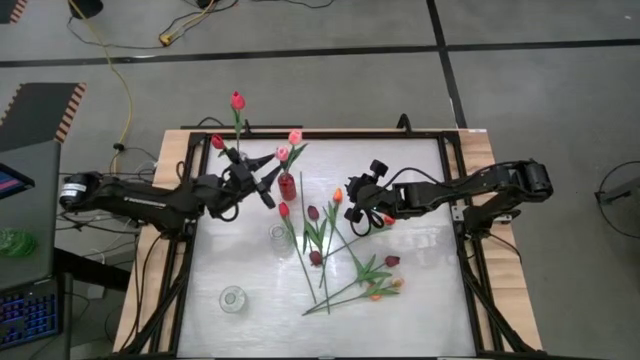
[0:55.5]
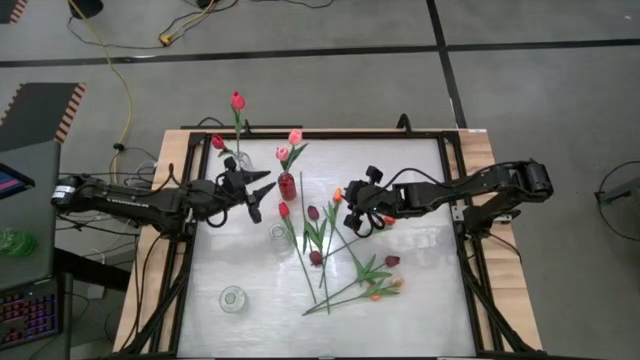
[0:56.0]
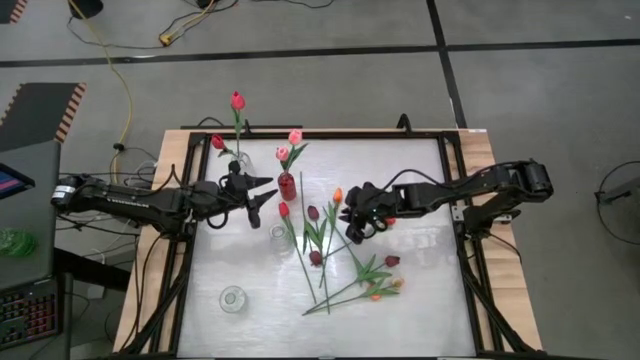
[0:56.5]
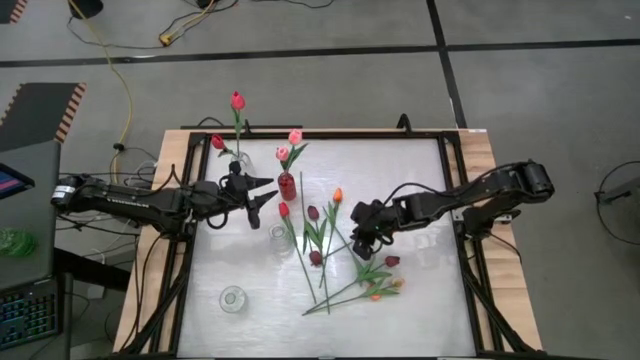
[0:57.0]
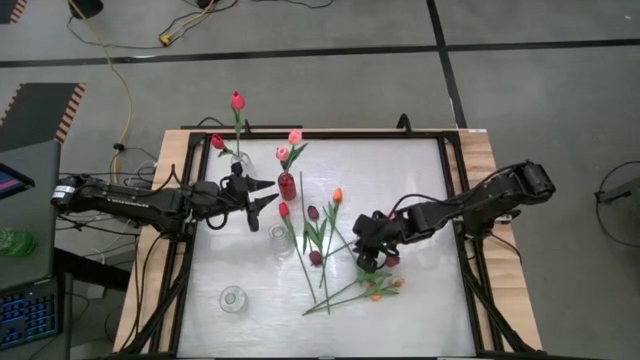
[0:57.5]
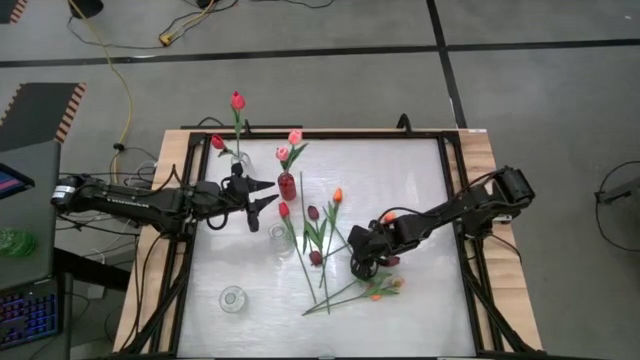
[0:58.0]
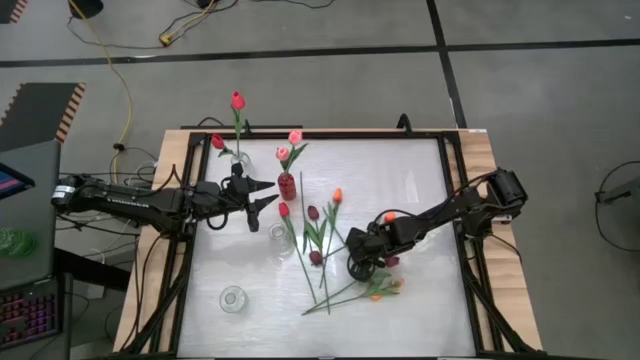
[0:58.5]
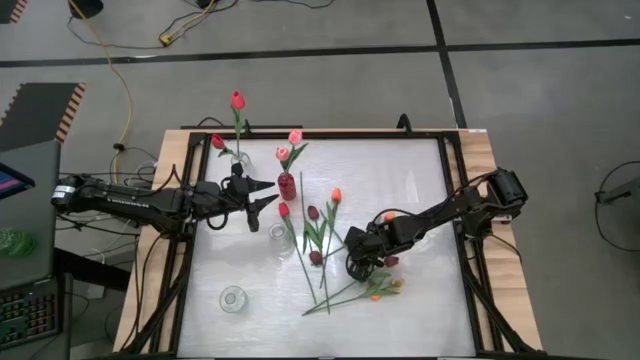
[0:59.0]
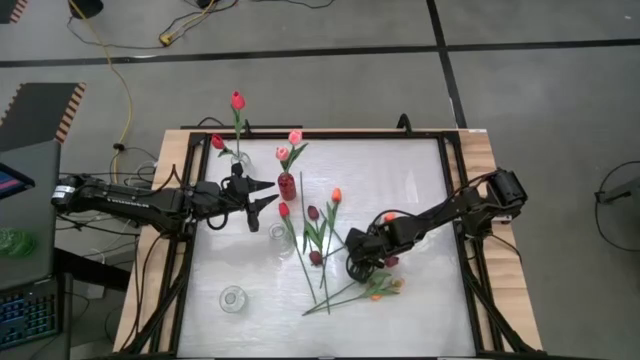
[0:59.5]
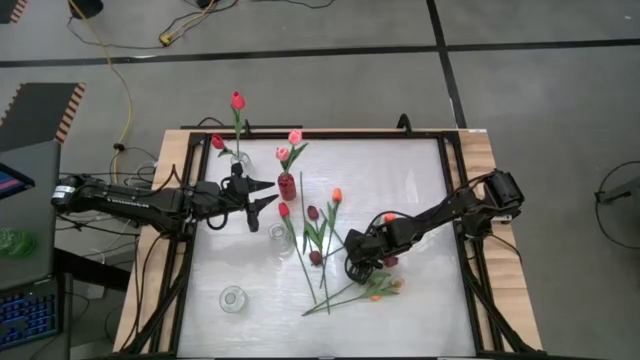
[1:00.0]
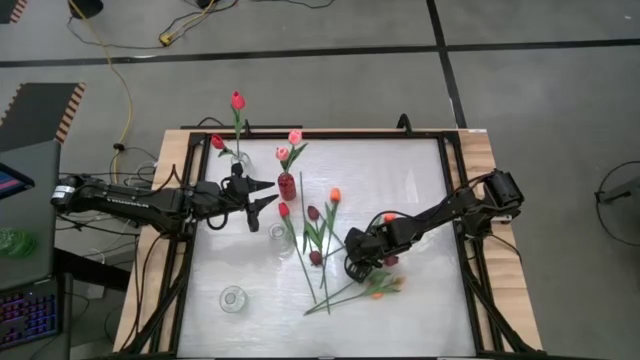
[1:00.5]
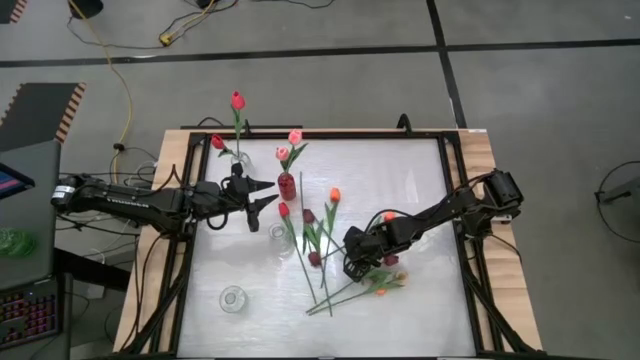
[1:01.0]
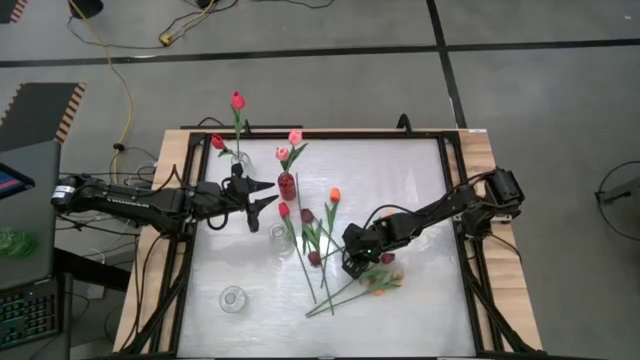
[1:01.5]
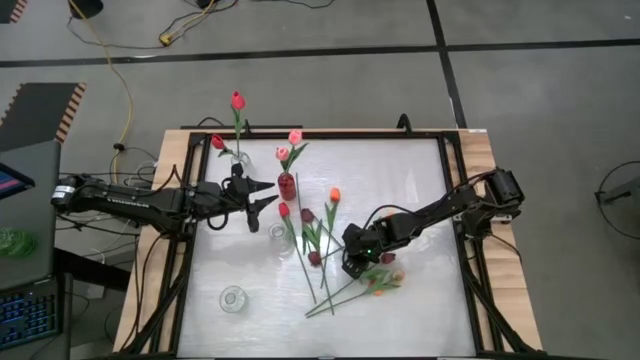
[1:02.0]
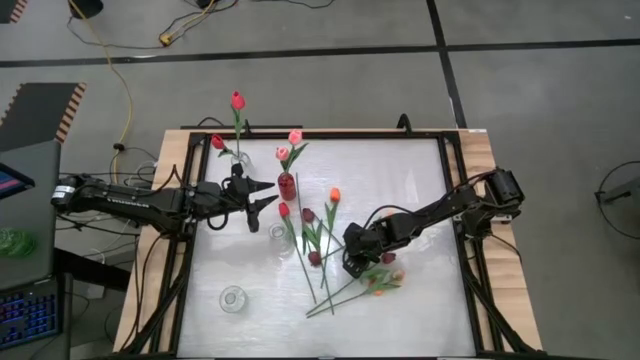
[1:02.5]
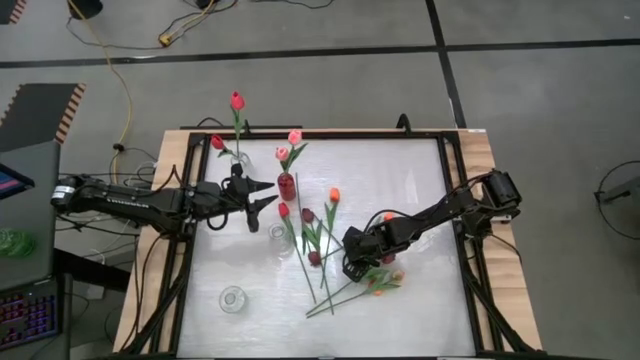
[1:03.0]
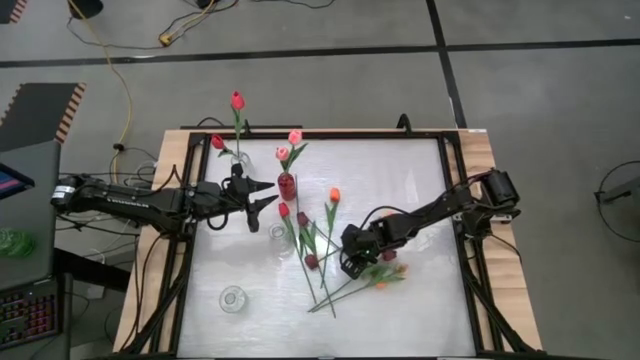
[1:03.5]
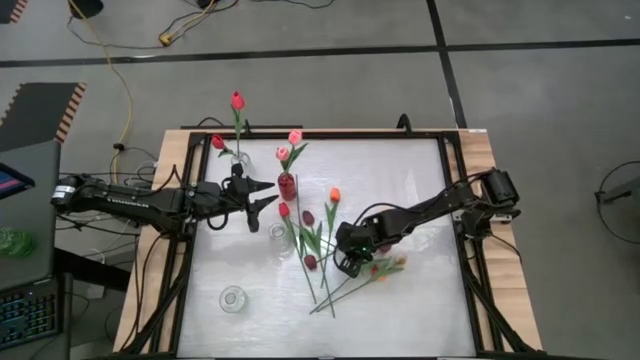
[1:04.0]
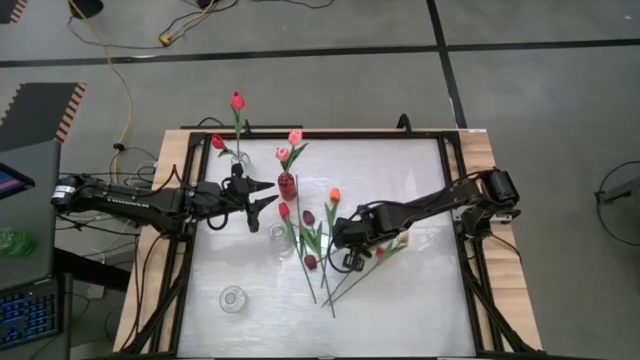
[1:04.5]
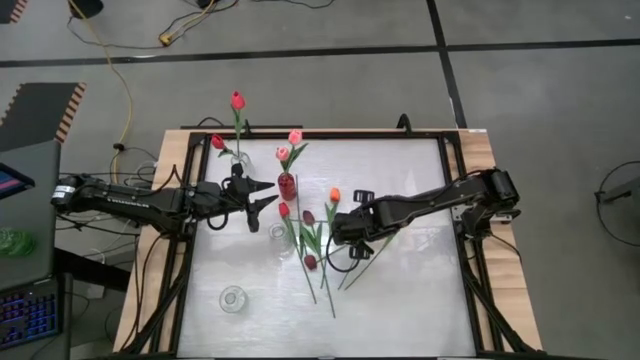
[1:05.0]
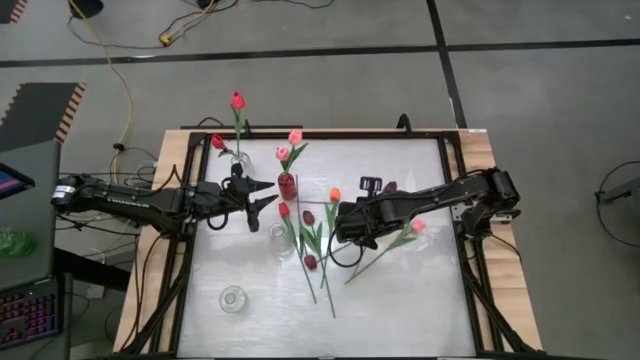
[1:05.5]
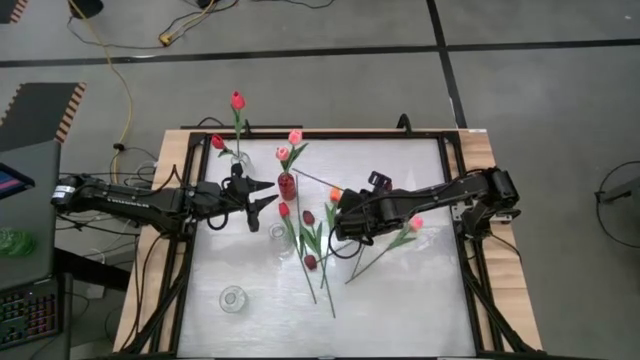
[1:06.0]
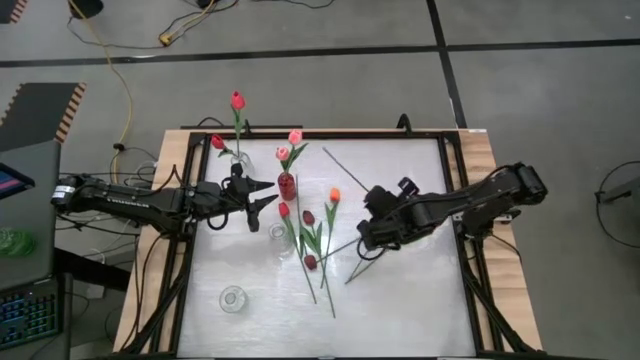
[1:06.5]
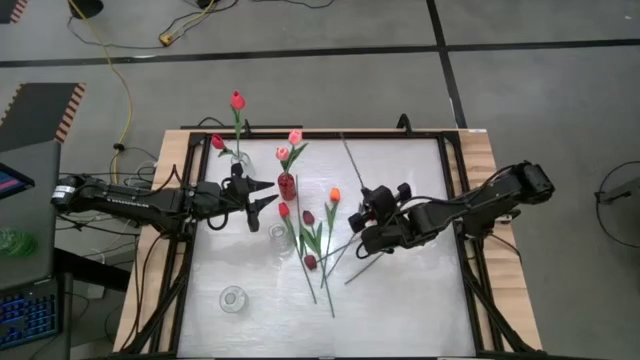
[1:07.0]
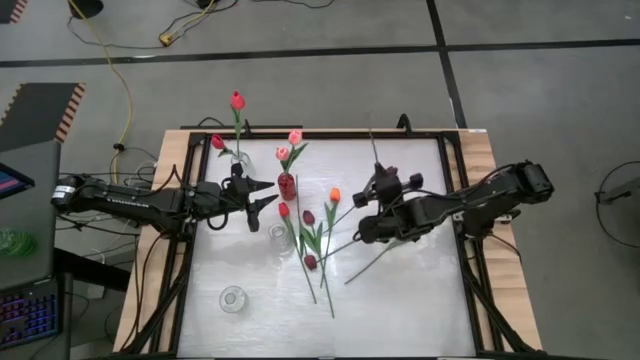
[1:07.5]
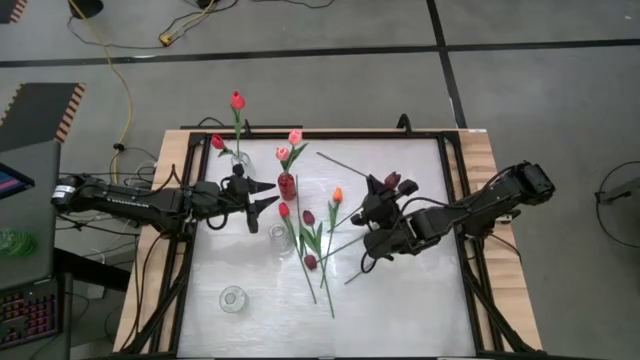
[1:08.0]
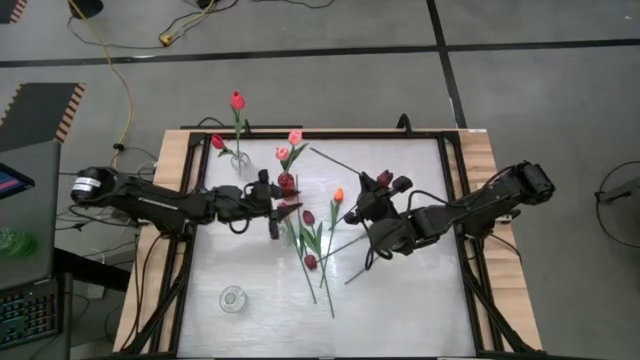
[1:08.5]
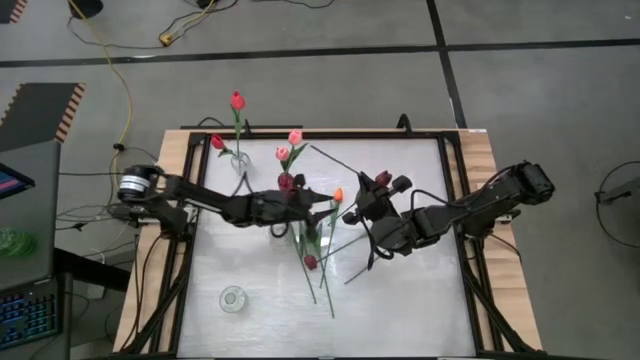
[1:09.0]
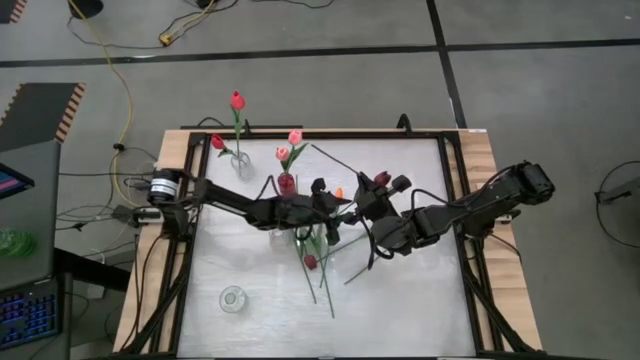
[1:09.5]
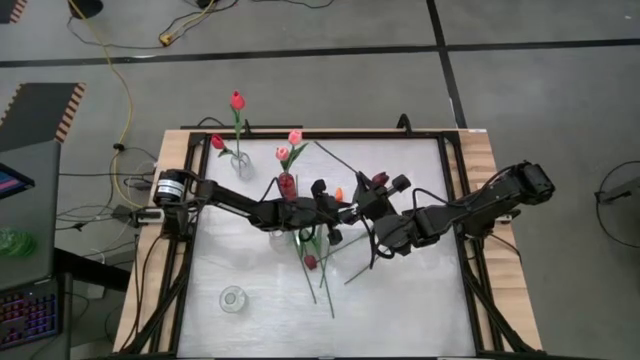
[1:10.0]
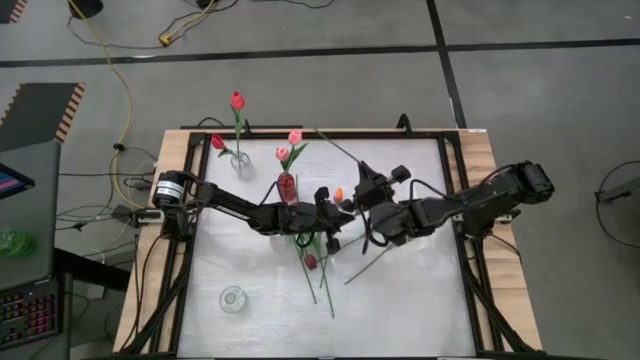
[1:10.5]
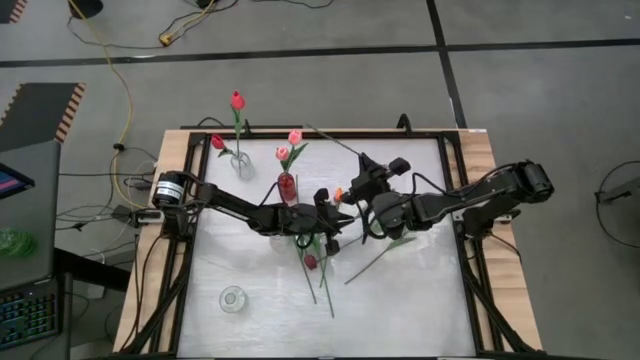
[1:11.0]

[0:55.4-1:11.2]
Task: Sort flowers into vase by color
Put the orange tulip into the middle transparent vase

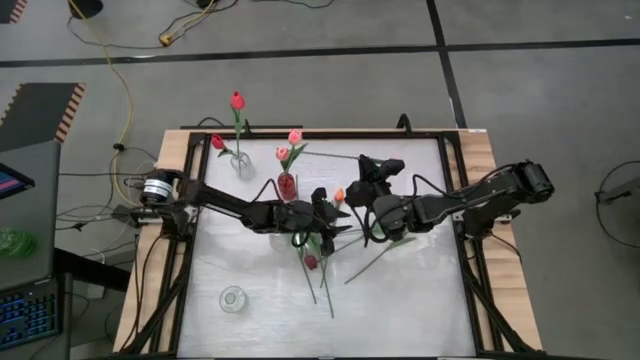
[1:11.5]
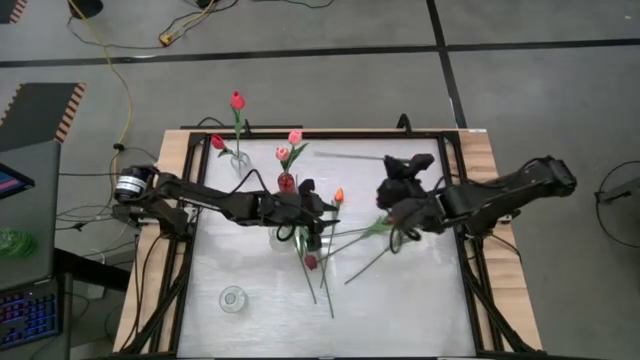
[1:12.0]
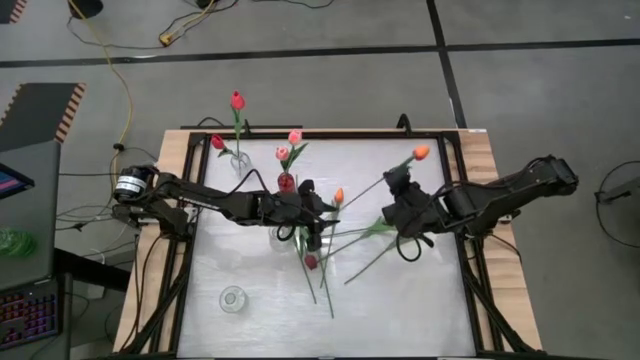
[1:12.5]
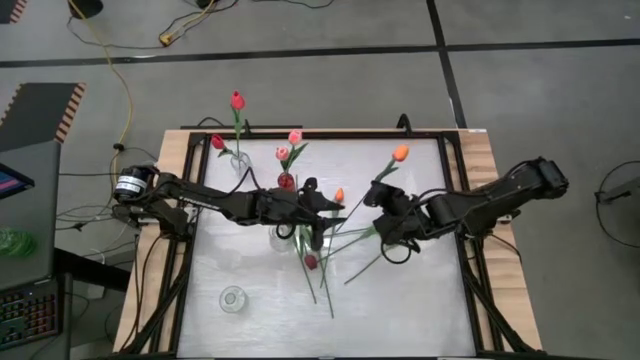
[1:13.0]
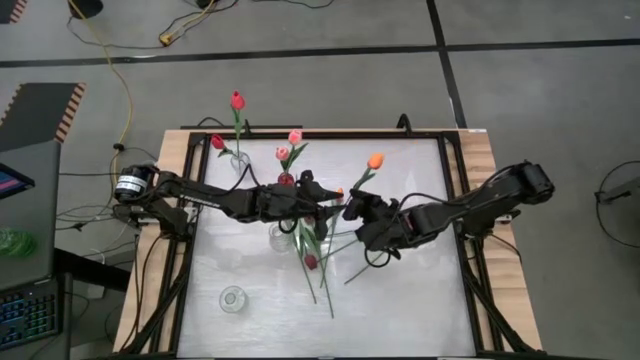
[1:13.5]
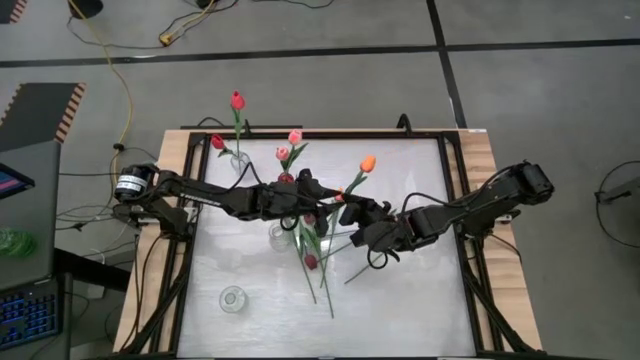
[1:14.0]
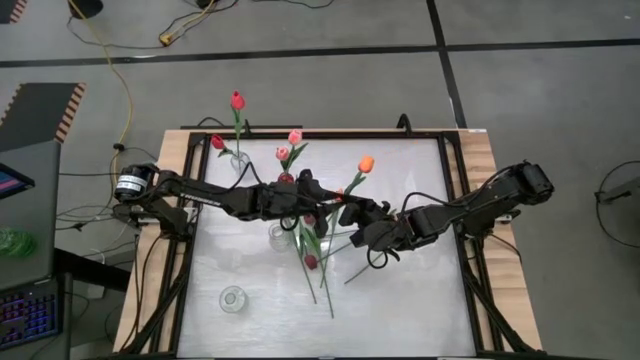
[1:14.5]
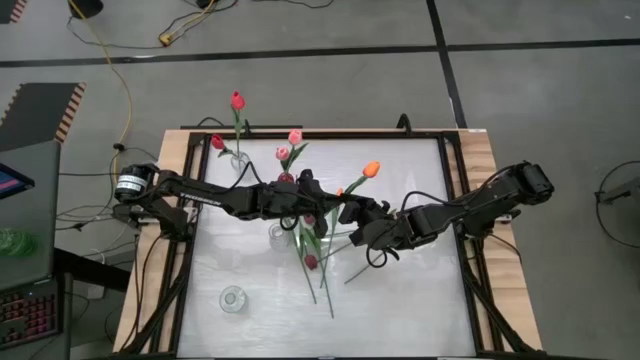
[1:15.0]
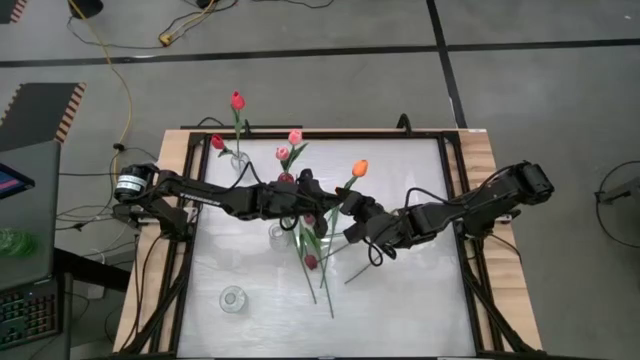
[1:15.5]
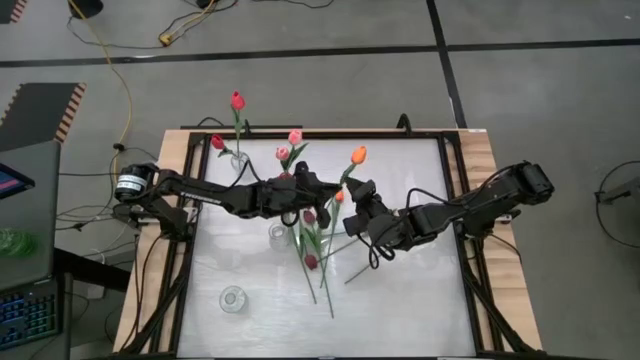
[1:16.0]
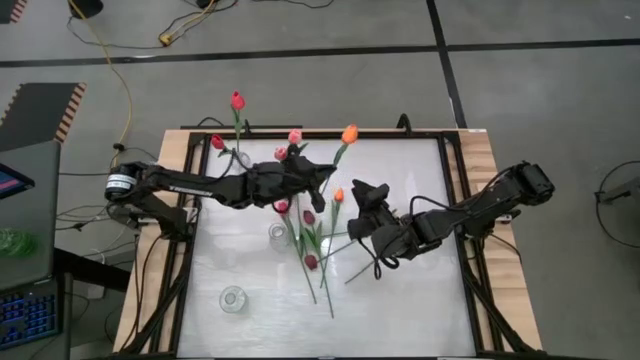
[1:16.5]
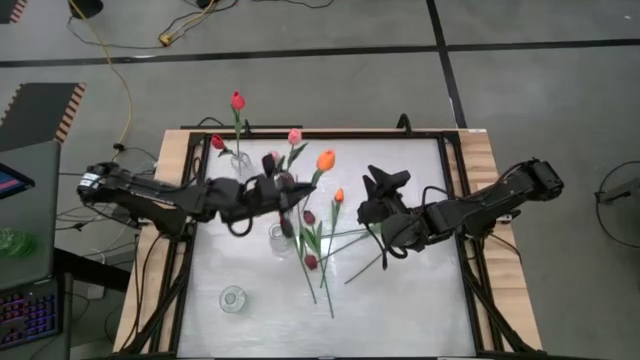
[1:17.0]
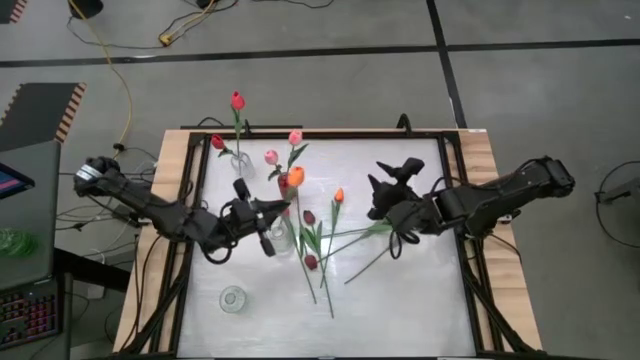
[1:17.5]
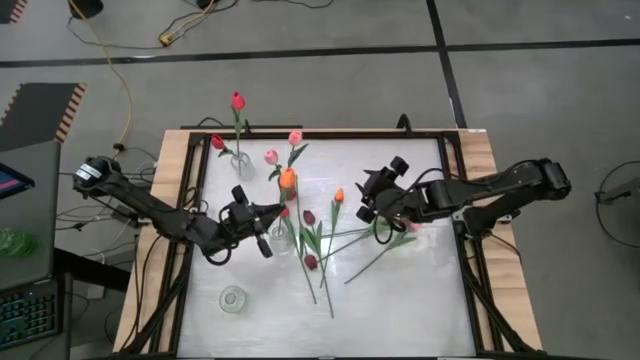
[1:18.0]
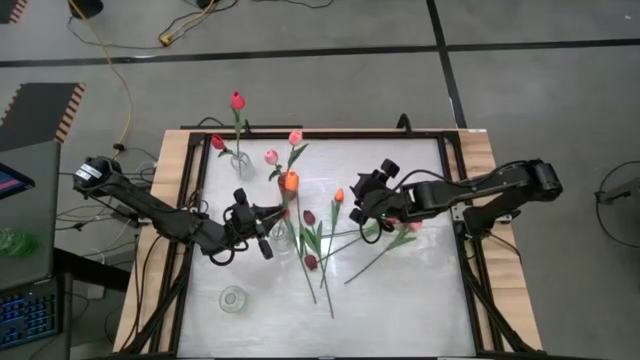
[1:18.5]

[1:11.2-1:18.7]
Put the orange tulip into the middle transparent vase
